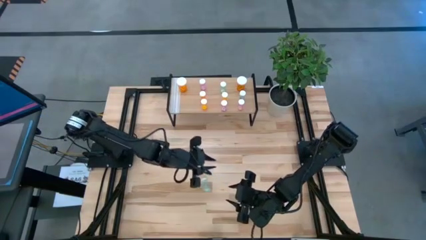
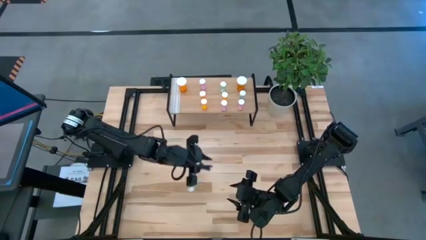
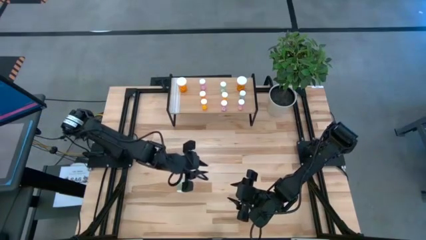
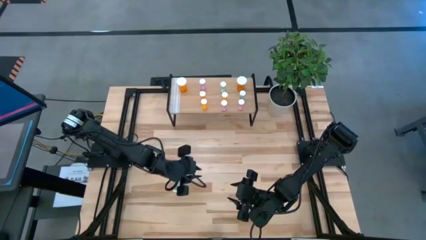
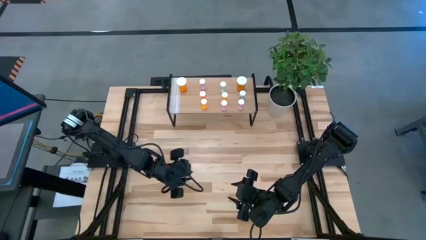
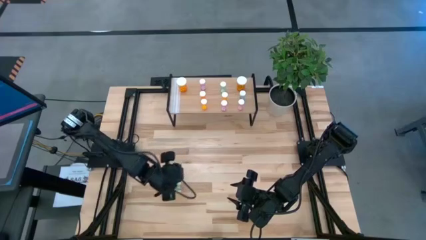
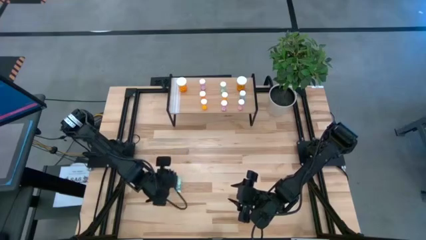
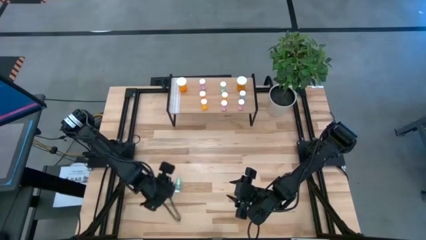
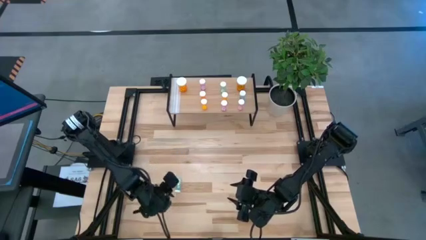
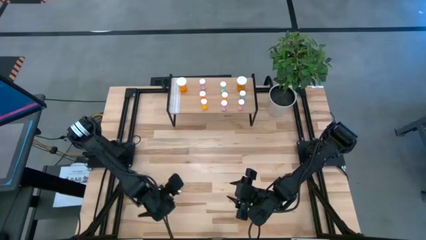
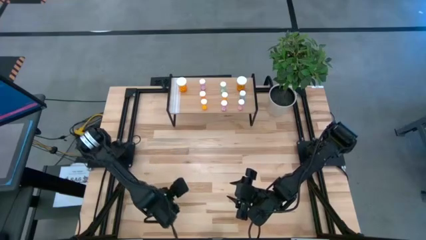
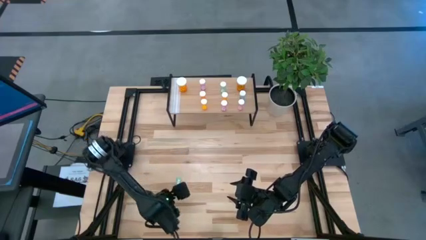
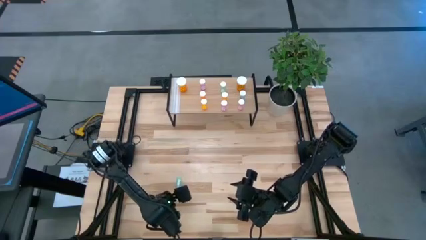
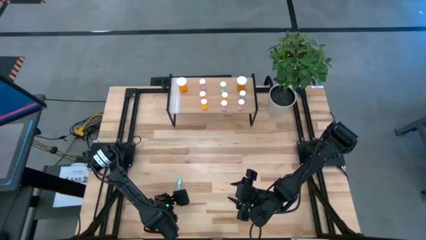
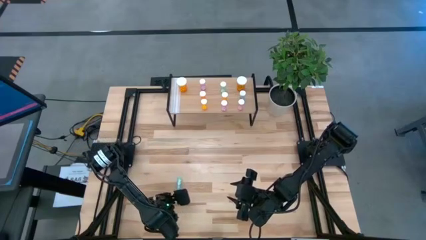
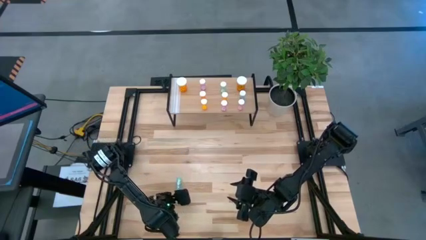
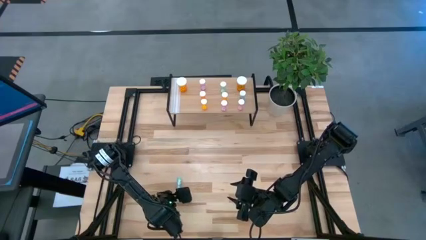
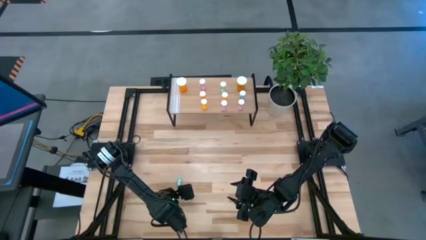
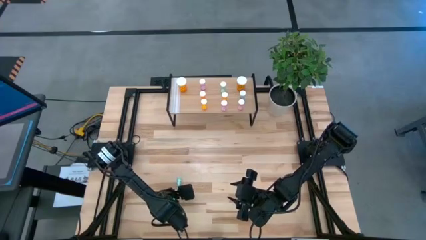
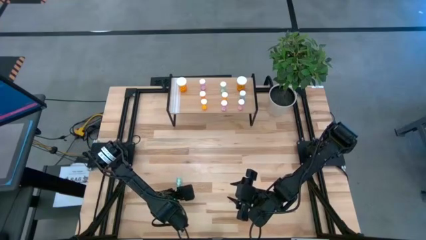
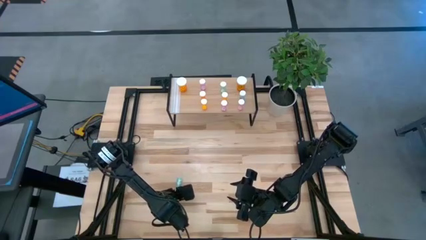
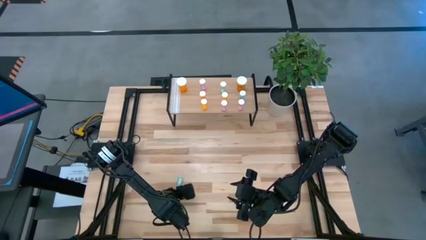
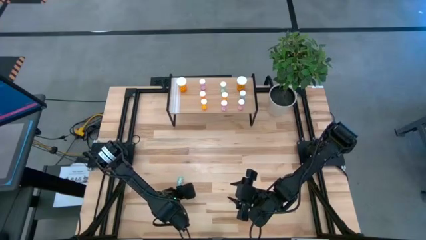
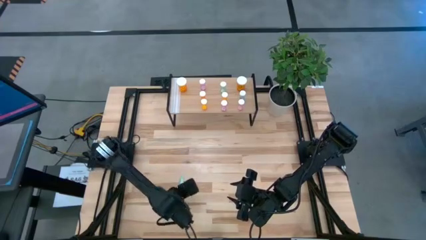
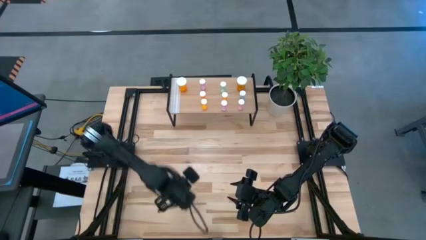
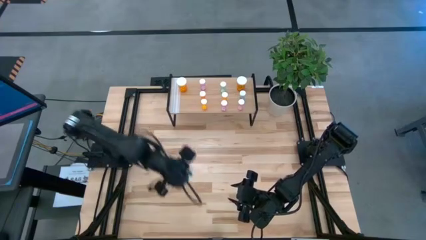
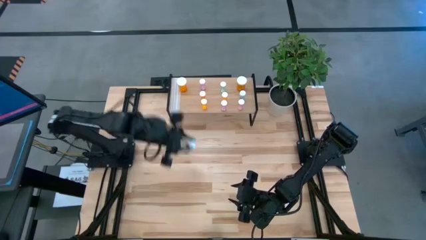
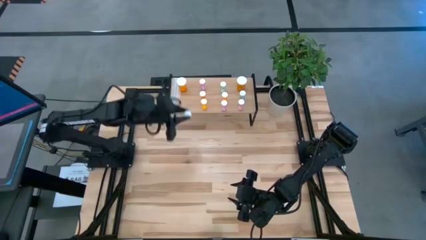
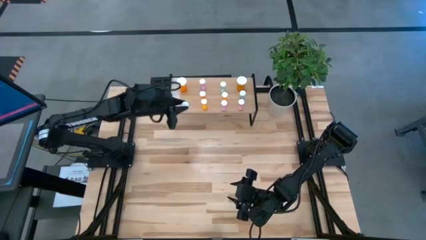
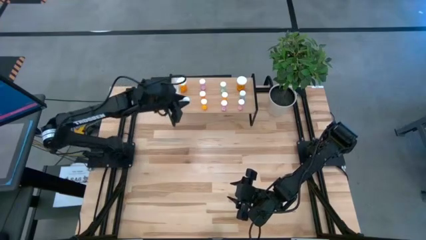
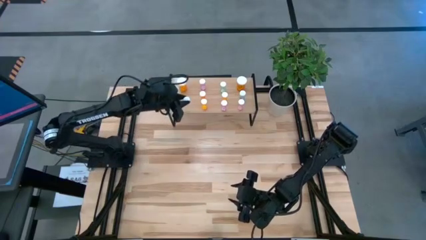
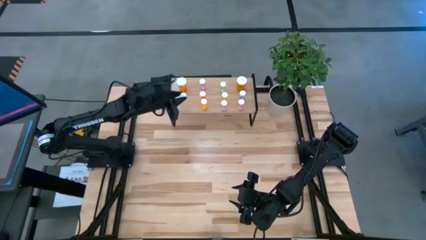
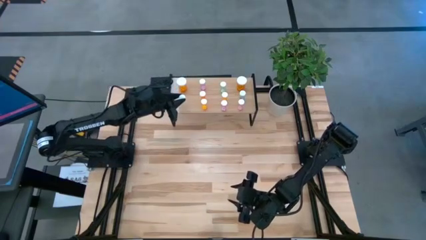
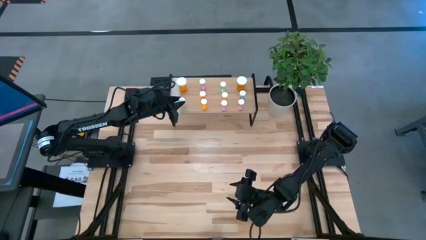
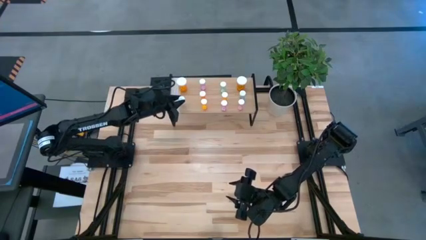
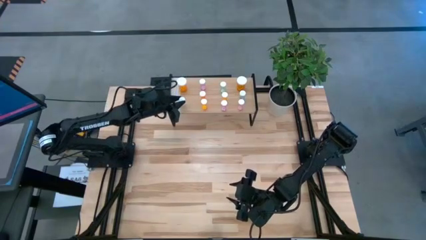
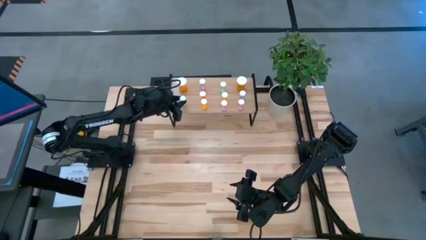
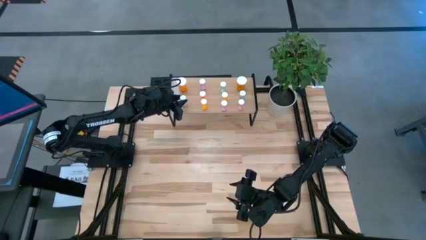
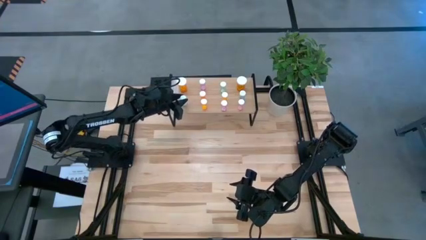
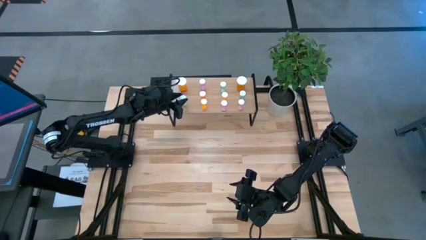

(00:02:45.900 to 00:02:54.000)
Task: Pick and place medicine bottles onto shelf by color
Put the small blue pill bottle on the shelf

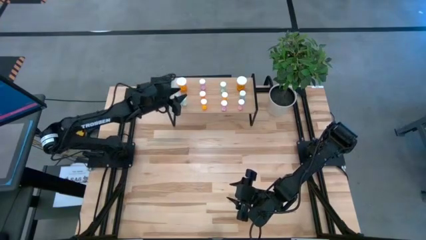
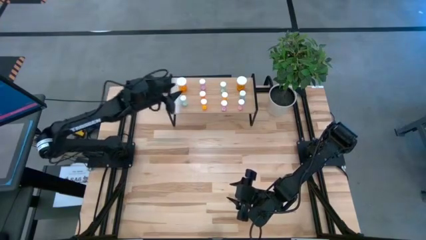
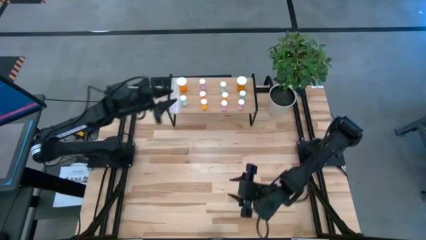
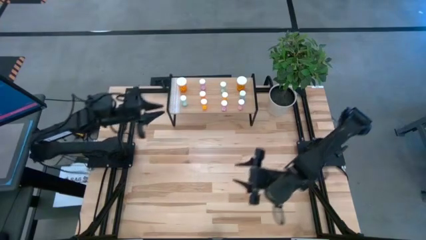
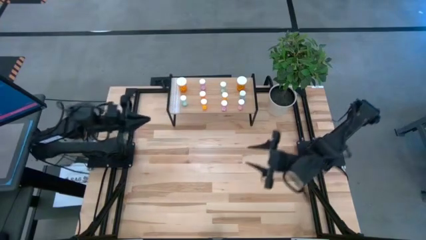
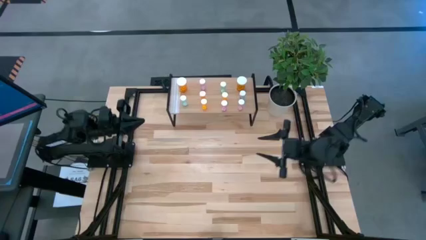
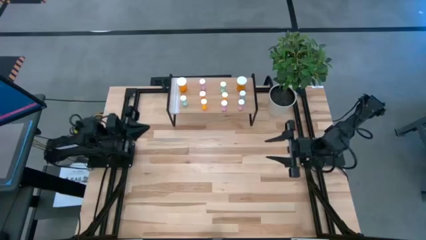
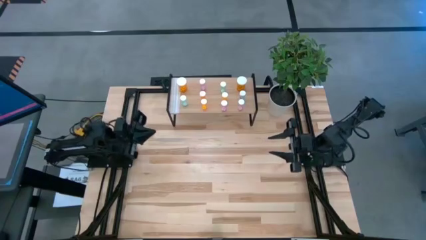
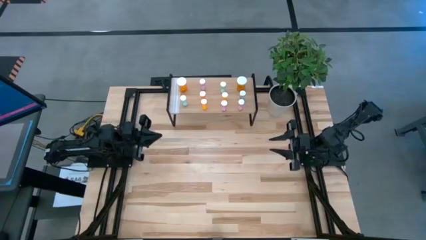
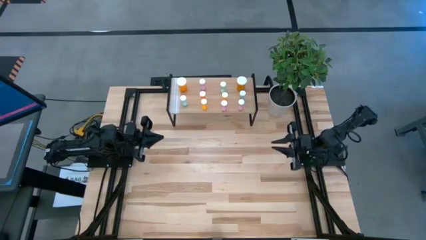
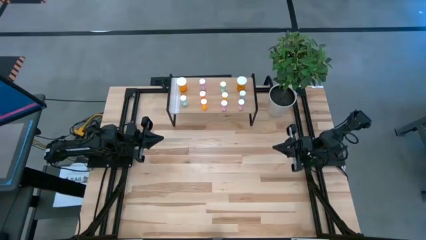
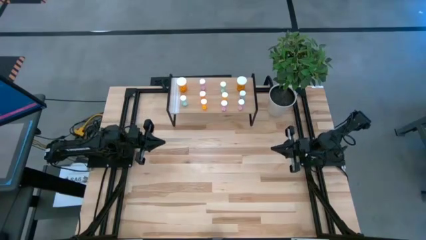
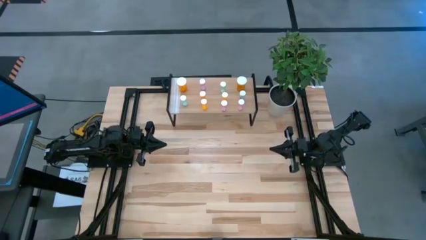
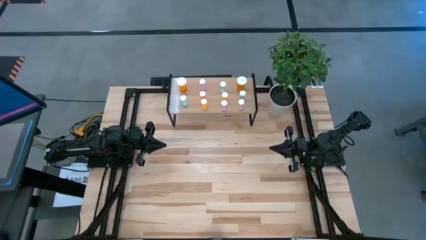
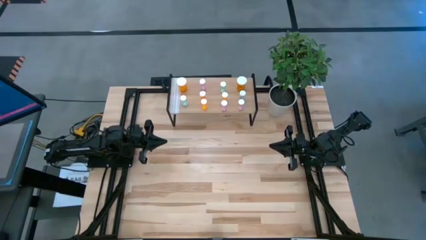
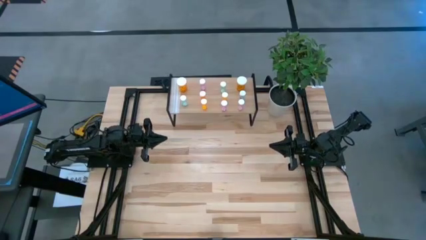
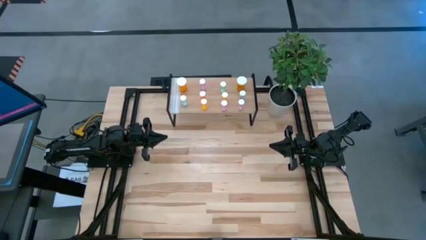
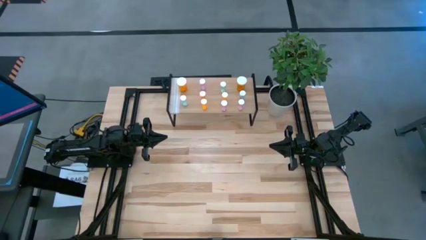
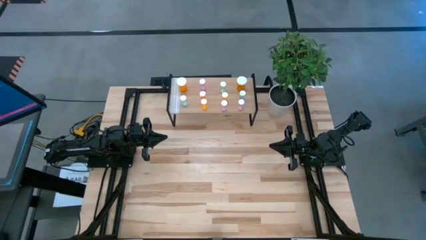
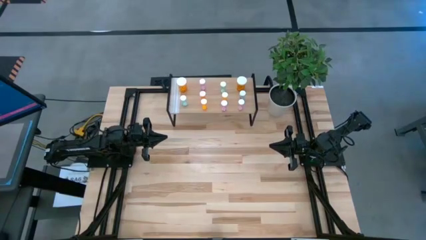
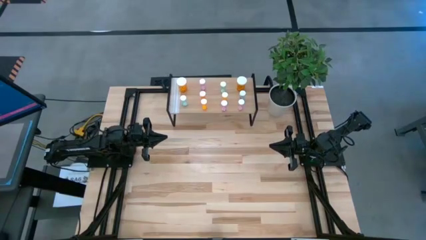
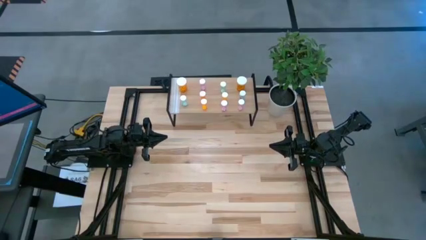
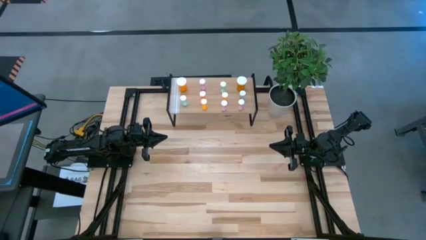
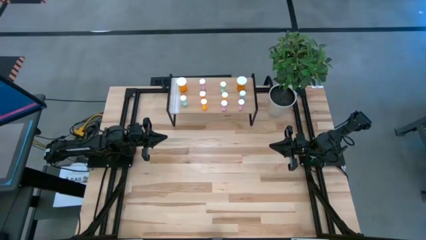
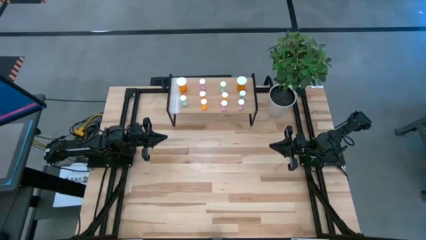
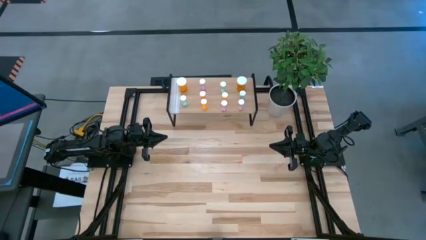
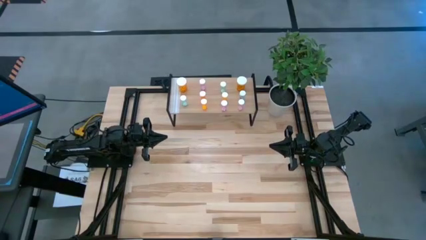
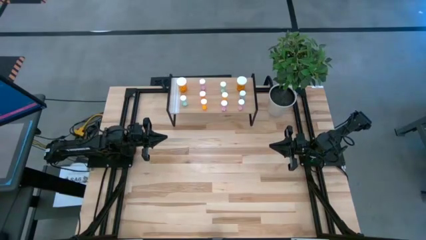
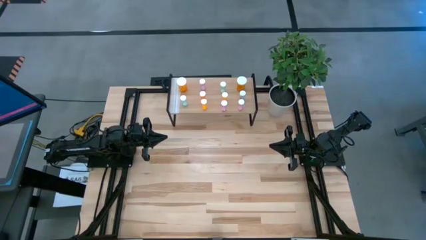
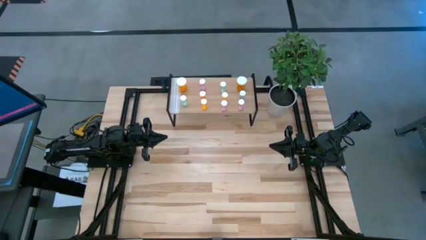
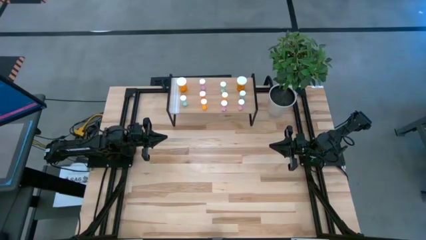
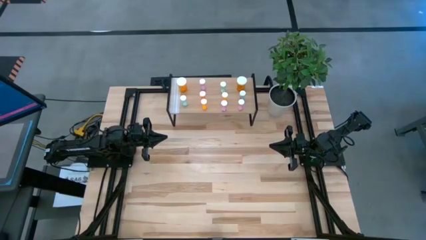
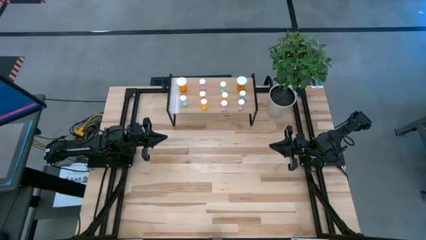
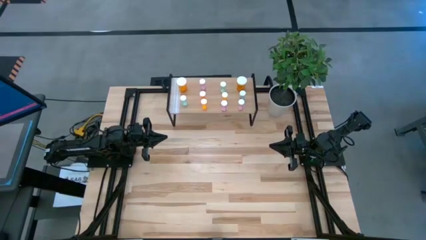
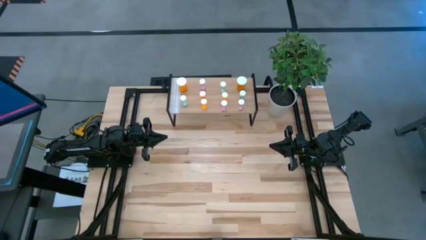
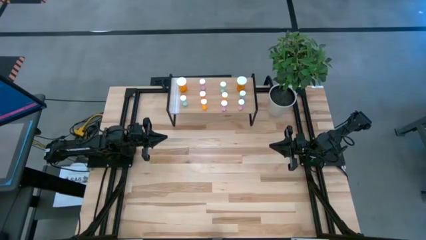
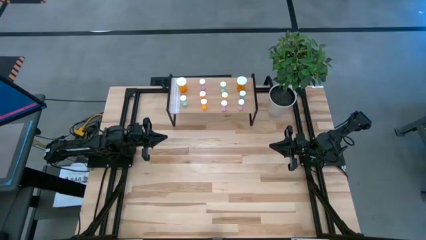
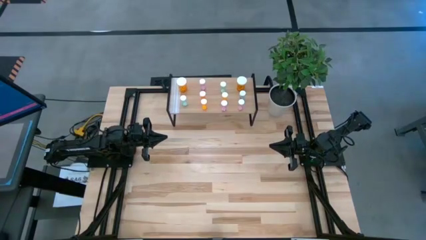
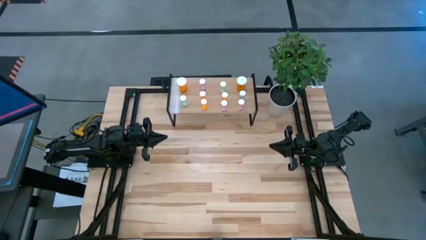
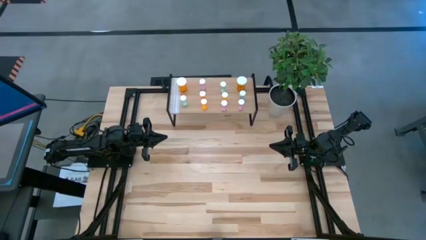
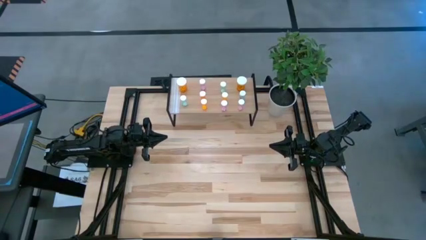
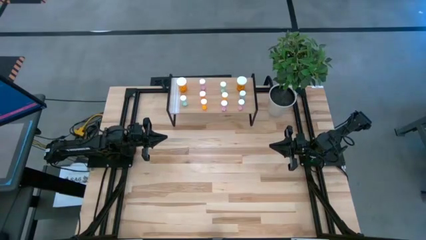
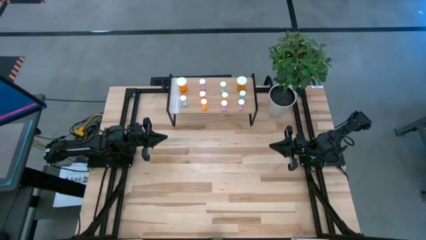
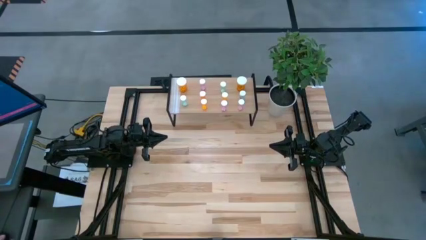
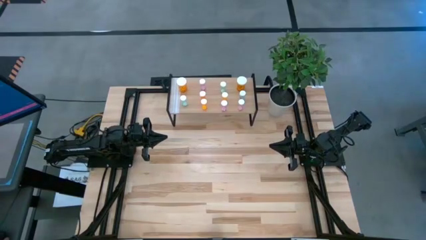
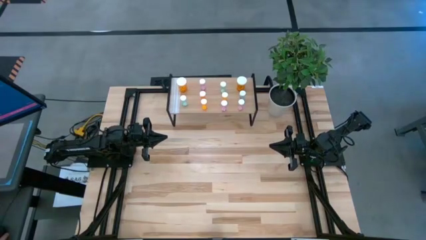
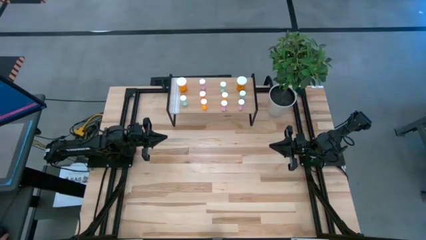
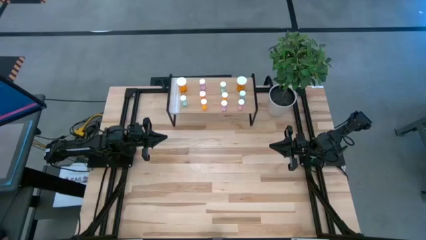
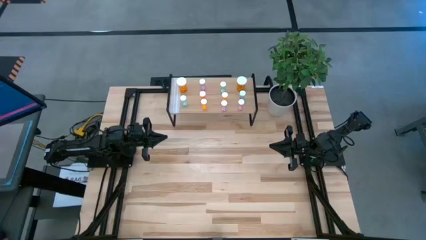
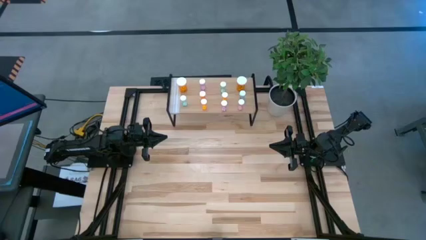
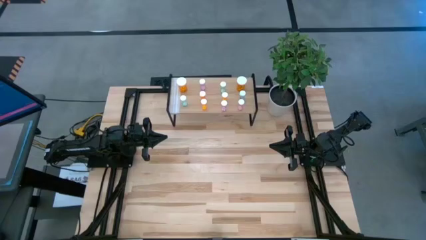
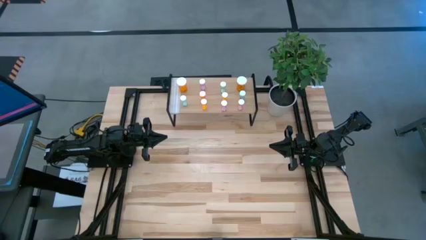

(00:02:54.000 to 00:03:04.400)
Return to Home Position
